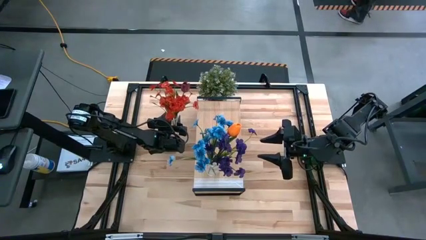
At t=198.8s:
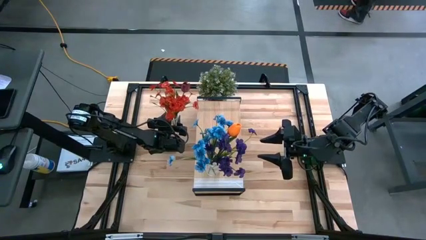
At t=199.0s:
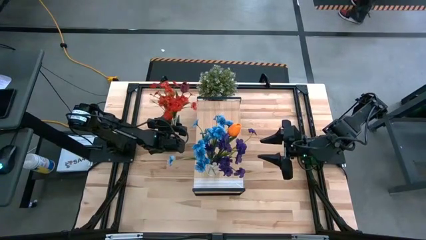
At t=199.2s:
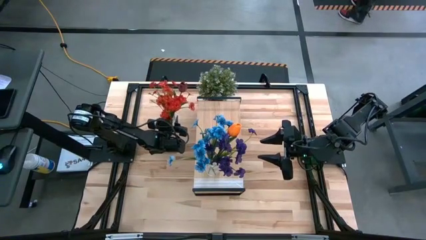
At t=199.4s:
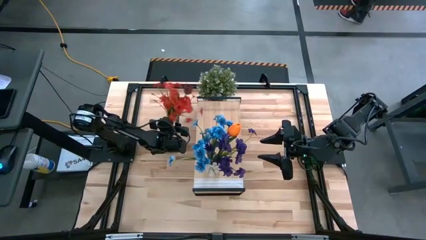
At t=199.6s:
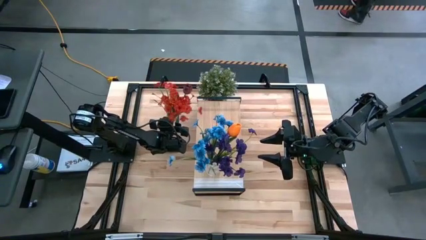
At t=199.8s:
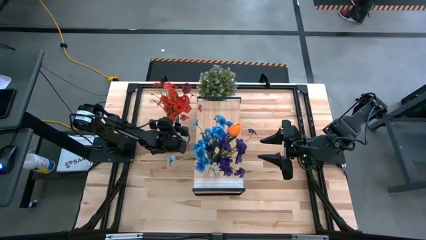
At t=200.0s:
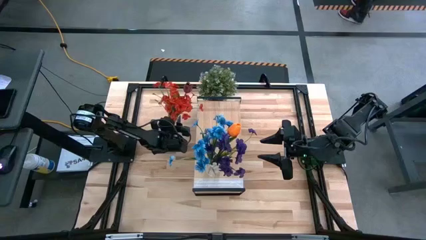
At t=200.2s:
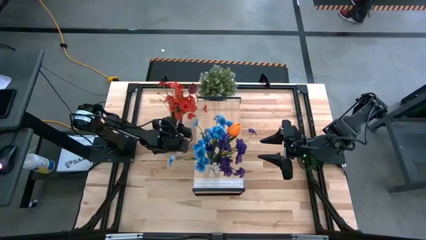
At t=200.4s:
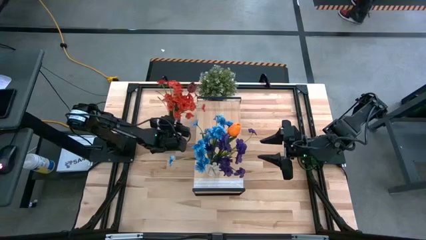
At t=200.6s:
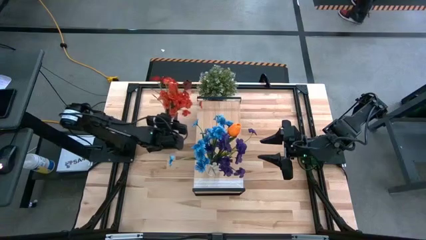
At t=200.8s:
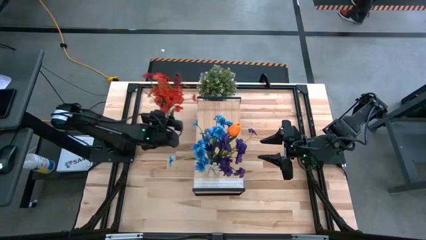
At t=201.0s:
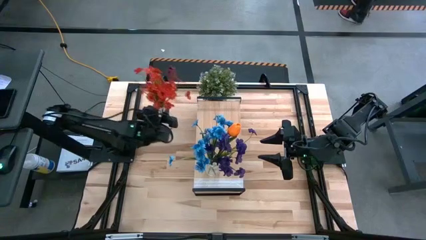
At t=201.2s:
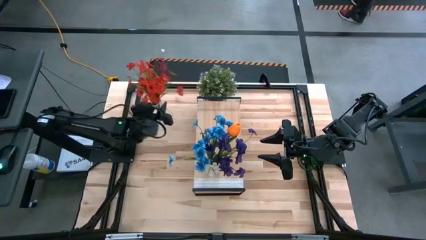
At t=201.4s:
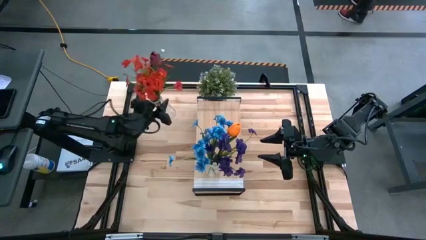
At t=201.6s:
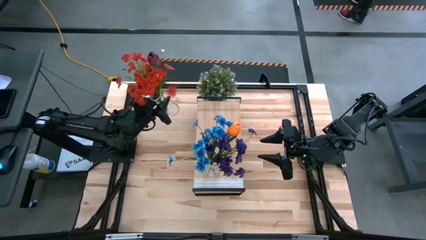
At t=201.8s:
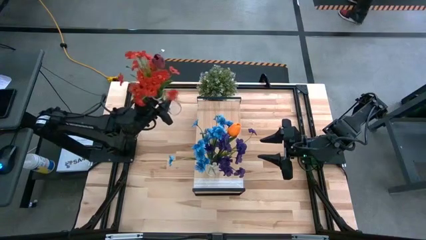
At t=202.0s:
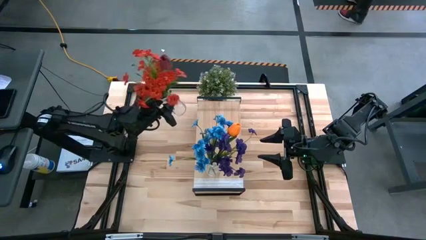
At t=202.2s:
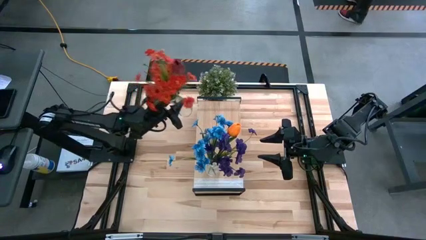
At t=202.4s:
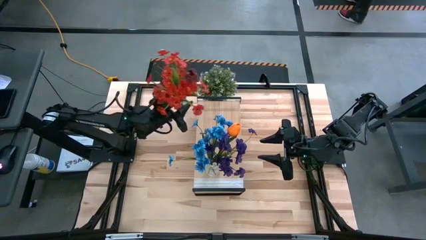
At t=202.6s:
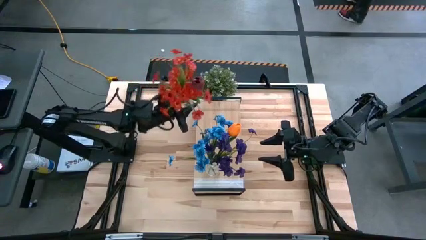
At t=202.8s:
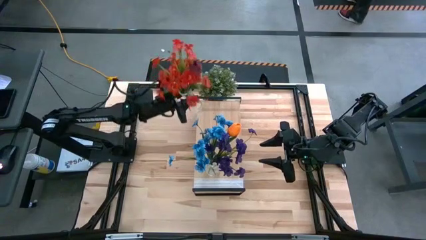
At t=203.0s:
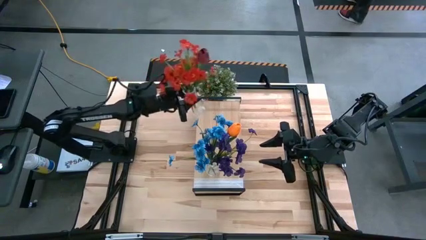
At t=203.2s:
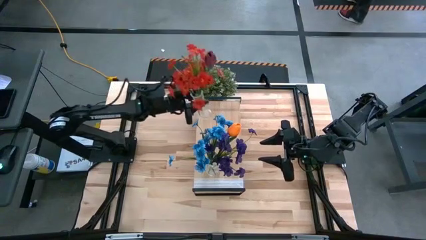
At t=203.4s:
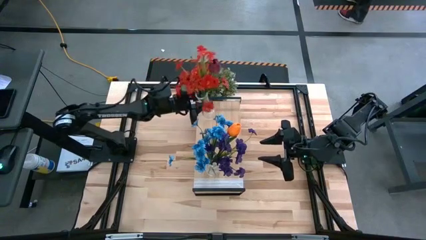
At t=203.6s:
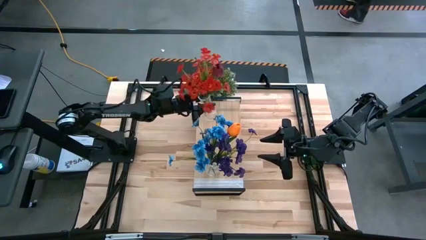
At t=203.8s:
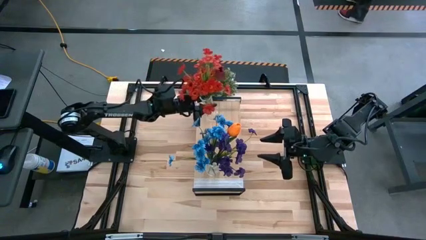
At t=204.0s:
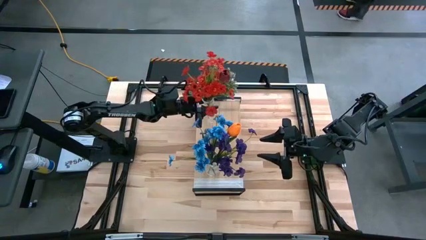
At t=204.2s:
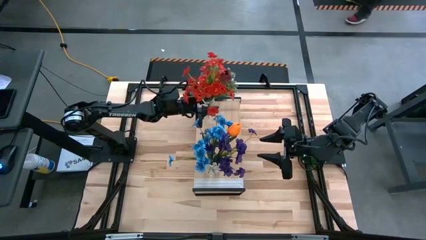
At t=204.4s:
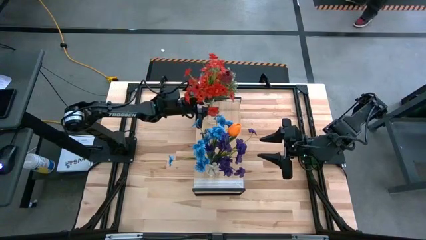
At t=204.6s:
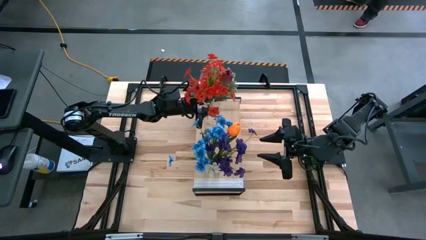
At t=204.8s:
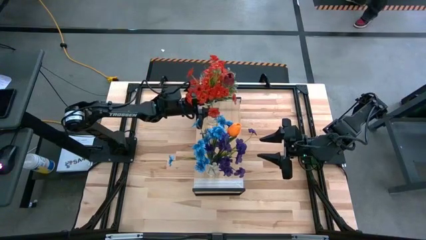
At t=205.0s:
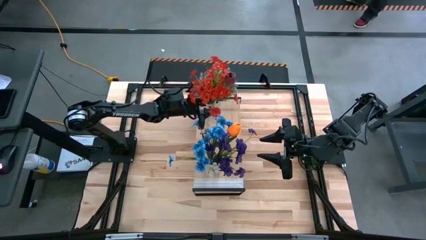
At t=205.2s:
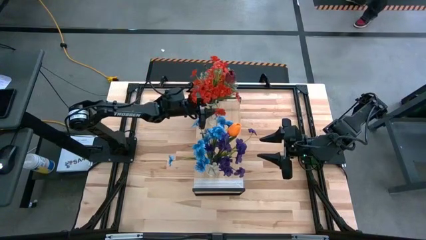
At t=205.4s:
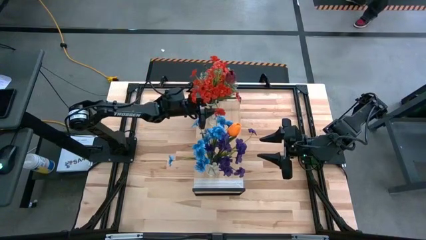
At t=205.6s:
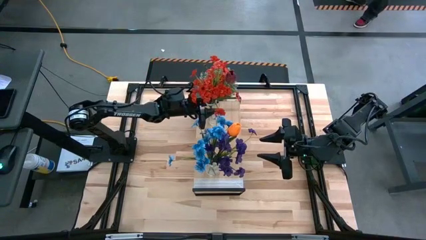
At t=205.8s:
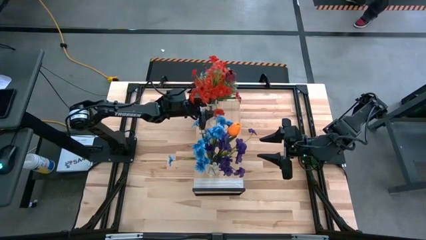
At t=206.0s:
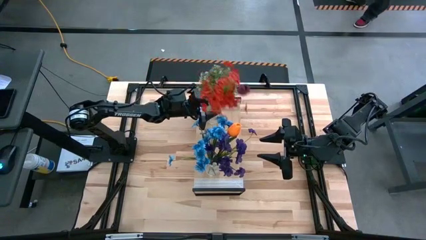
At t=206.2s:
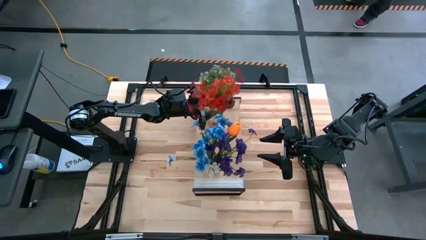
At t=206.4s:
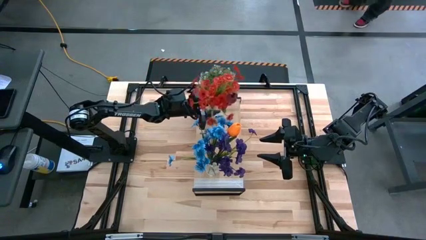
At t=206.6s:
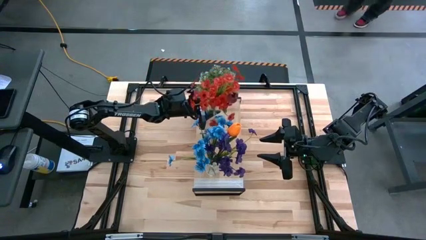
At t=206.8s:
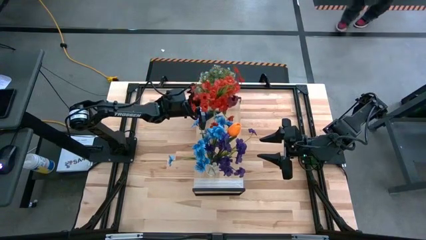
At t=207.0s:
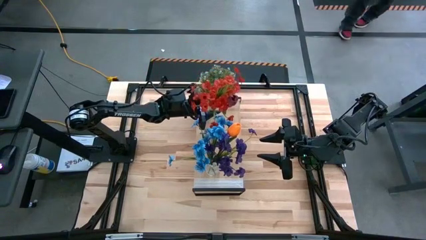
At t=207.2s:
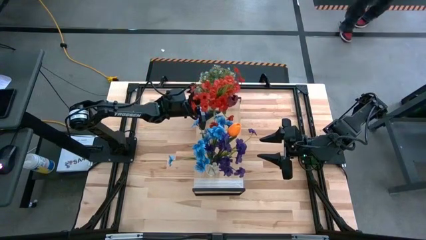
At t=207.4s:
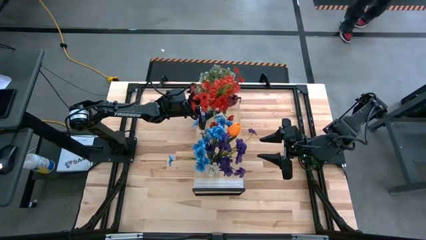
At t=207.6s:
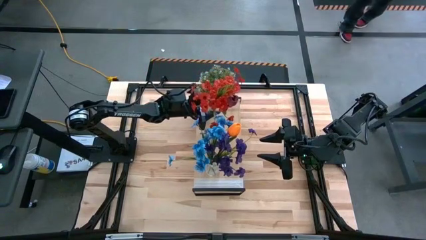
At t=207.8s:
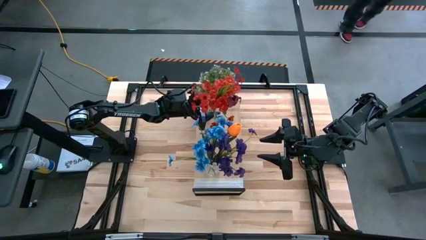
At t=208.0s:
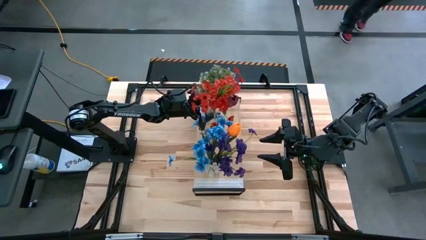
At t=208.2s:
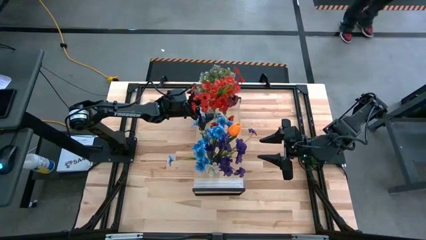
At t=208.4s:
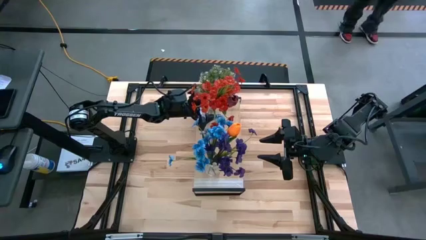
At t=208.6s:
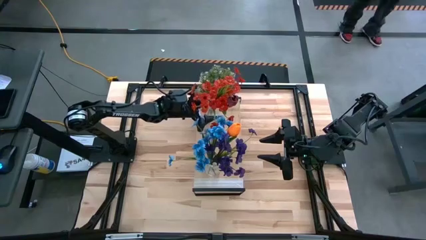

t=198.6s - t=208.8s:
Task: Pick and place flowers into a vace then onto a shelf
Put the left transparent vase on the shelf

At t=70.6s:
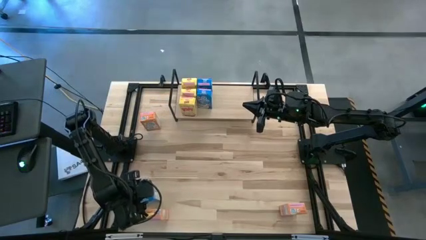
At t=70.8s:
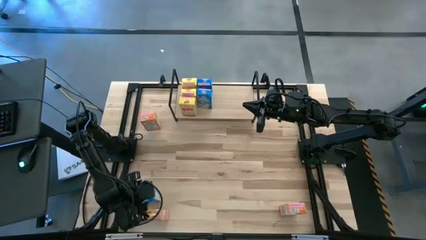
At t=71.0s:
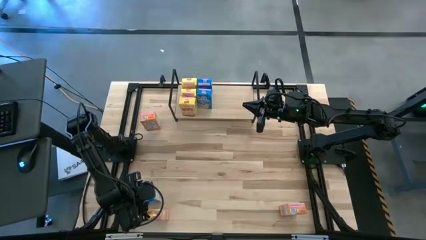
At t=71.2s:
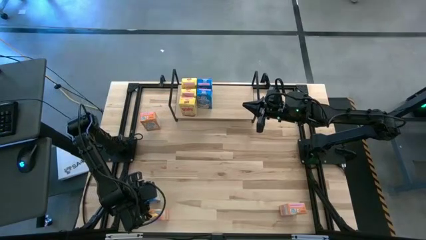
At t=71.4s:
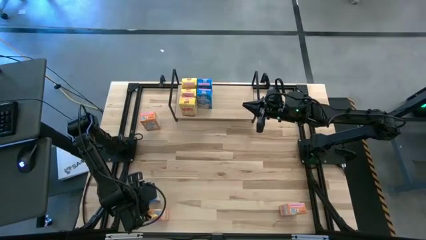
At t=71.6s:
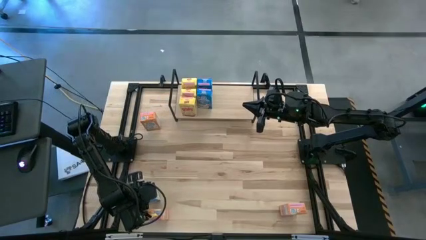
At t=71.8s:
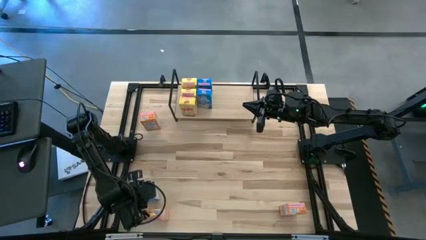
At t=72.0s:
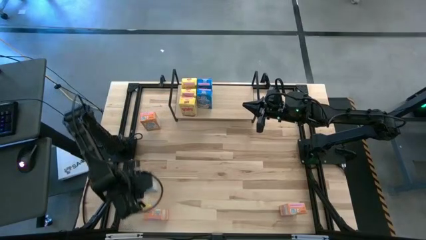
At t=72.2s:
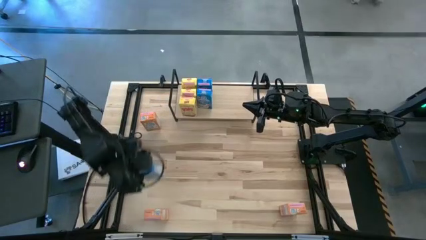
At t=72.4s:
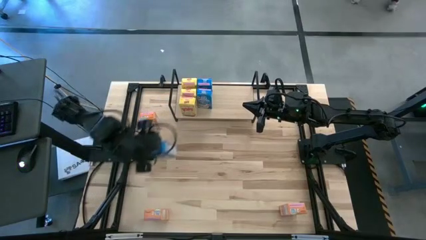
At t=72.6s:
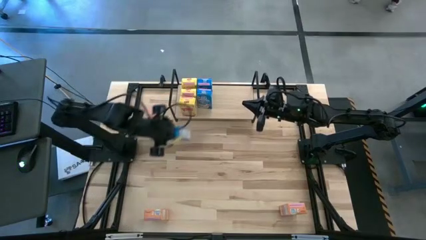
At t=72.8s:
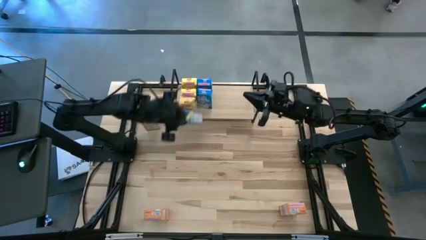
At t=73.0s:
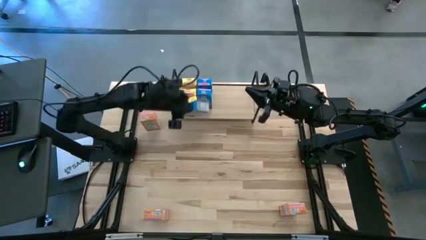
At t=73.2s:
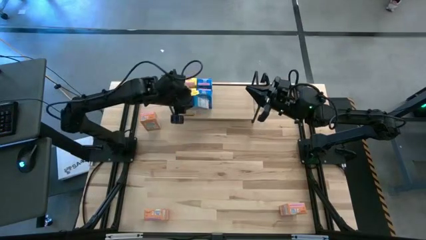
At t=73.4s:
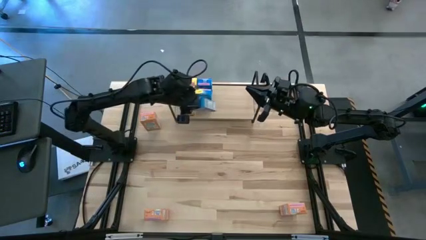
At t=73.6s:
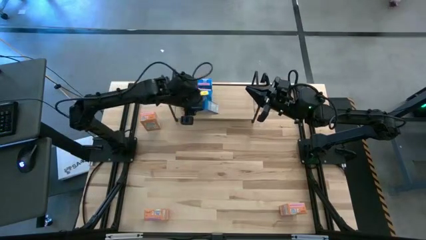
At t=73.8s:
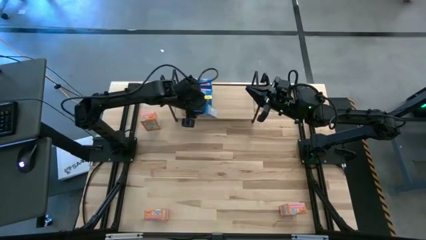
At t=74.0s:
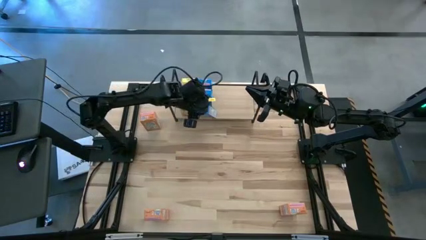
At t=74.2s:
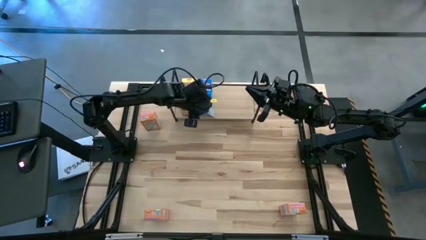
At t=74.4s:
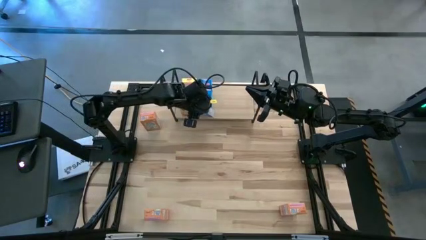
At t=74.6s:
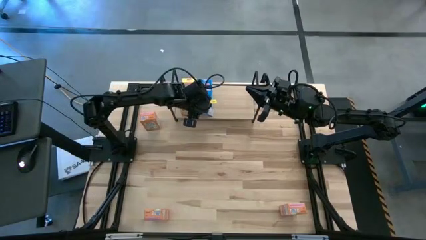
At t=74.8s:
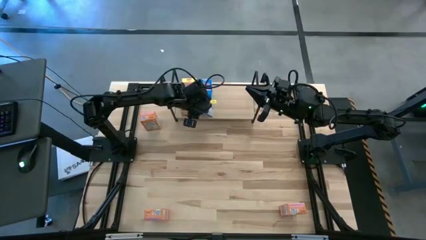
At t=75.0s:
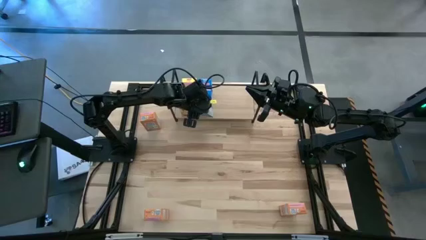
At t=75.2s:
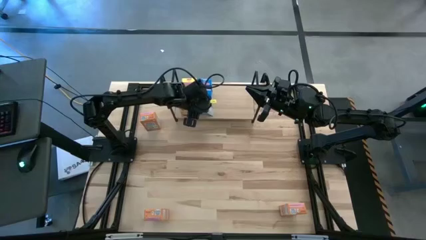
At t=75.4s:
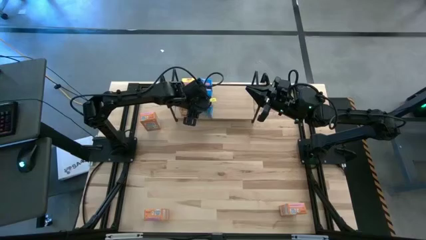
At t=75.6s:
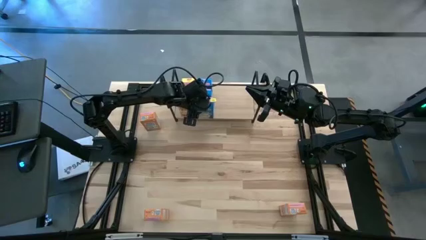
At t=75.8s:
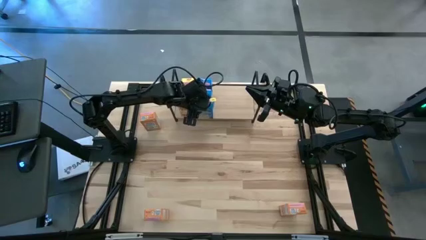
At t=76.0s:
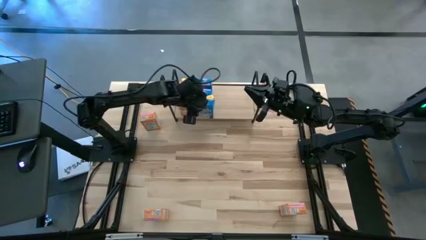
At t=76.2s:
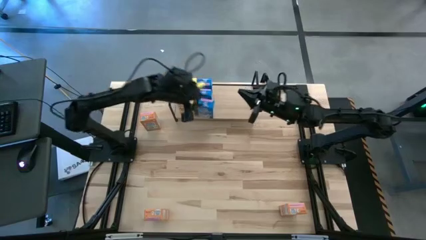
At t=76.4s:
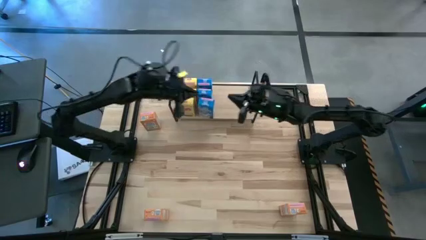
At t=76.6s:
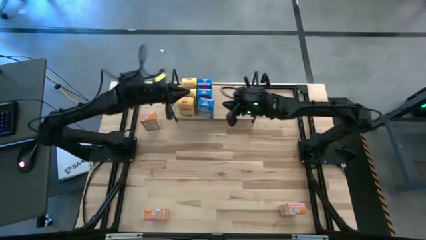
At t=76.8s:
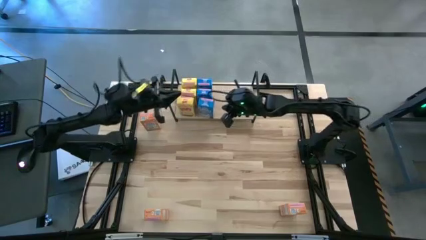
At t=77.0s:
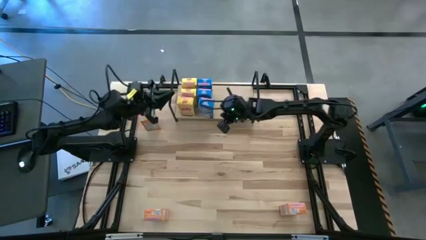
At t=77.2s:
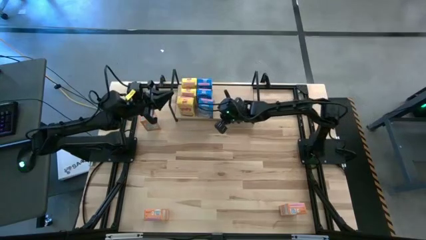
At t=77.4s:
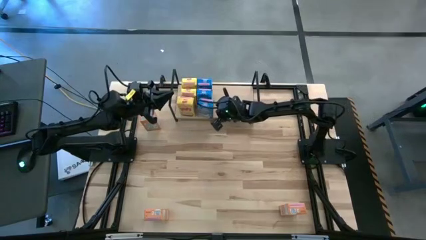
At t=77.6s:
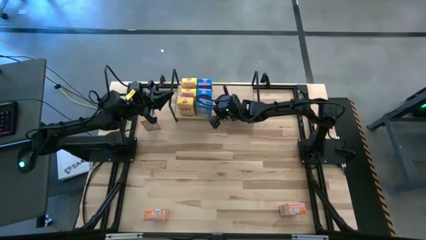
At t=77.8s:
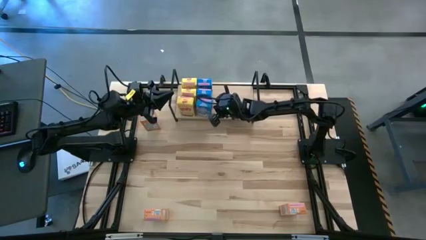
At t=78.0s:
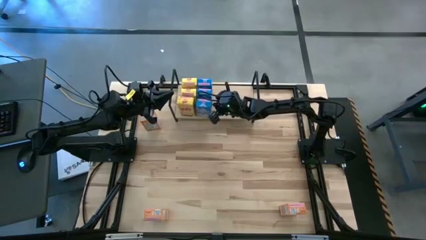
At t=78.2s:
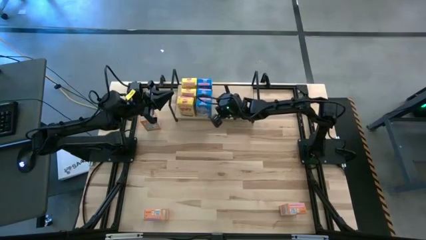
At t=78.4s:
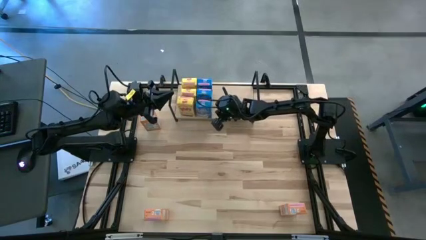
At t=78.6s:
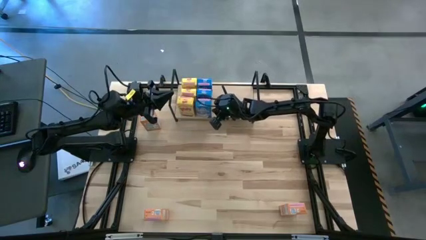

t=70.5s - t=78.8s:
Task: Stack cereal on shelf
Put the blue cereal box on the shelf aligned with the other blue cereal boxes
